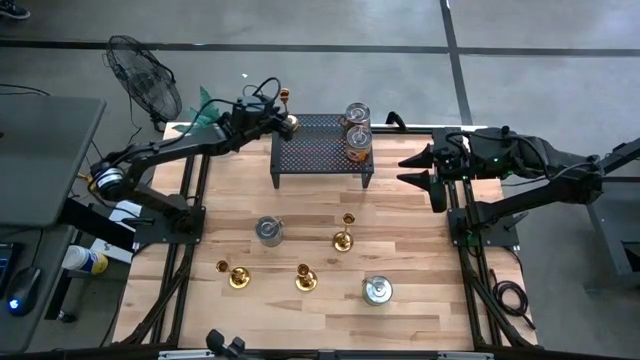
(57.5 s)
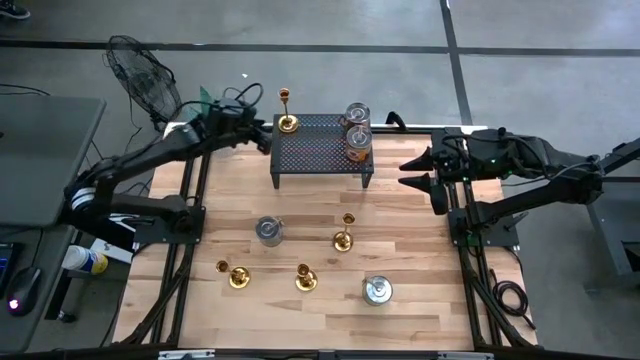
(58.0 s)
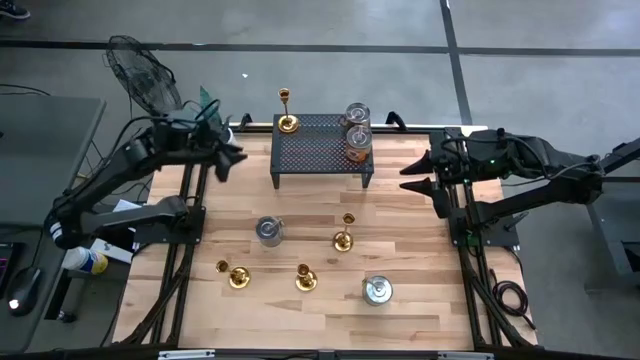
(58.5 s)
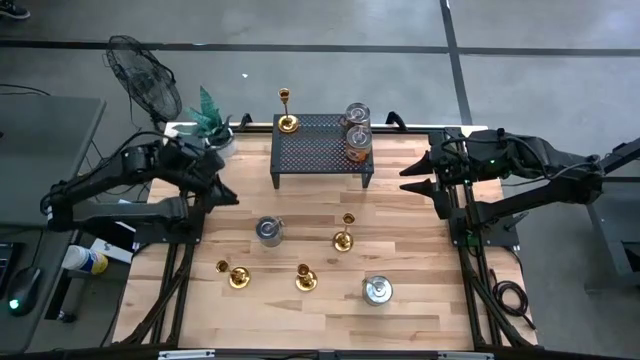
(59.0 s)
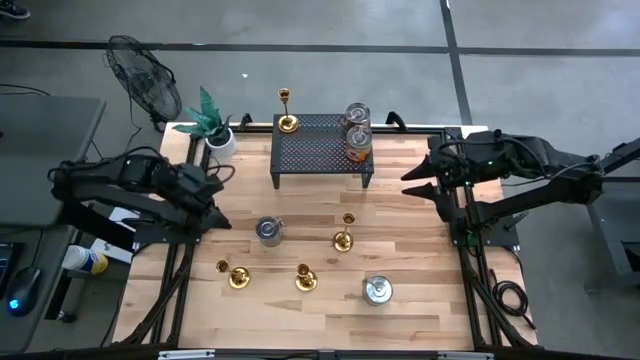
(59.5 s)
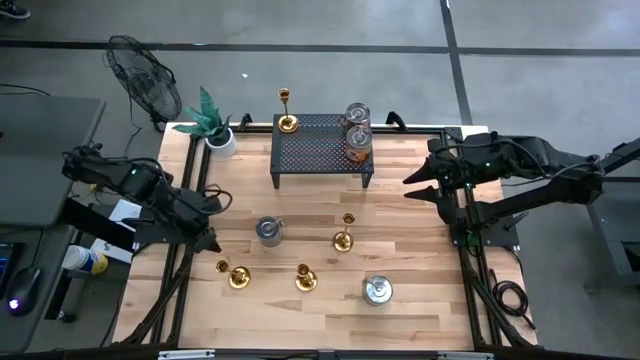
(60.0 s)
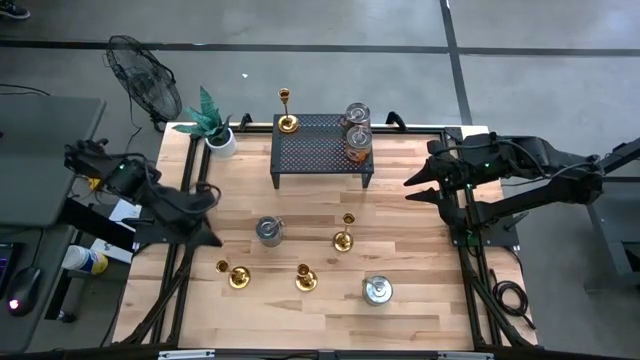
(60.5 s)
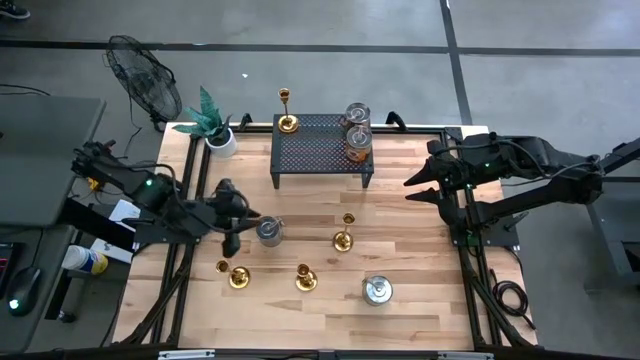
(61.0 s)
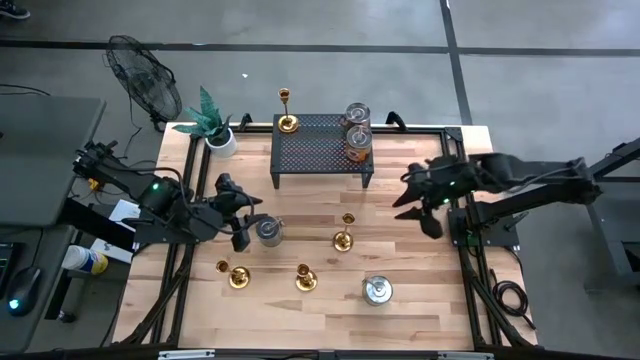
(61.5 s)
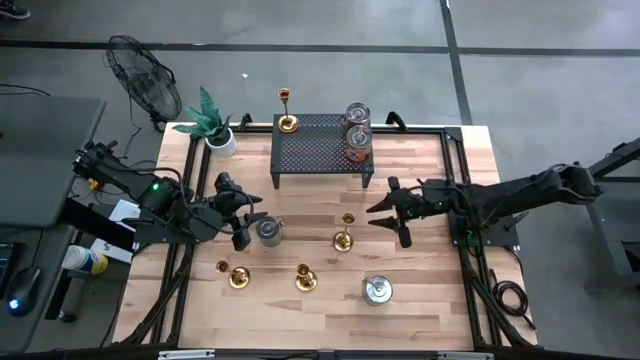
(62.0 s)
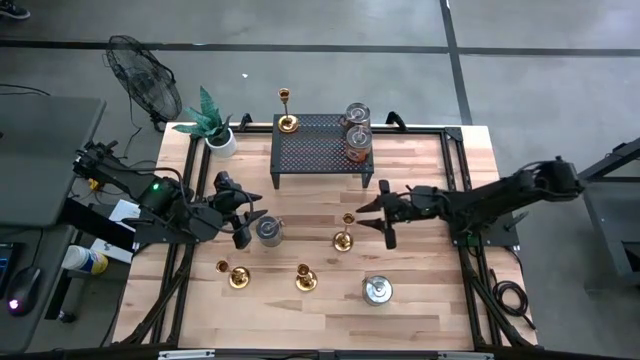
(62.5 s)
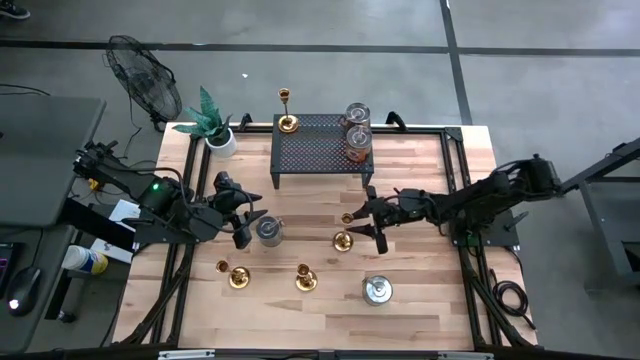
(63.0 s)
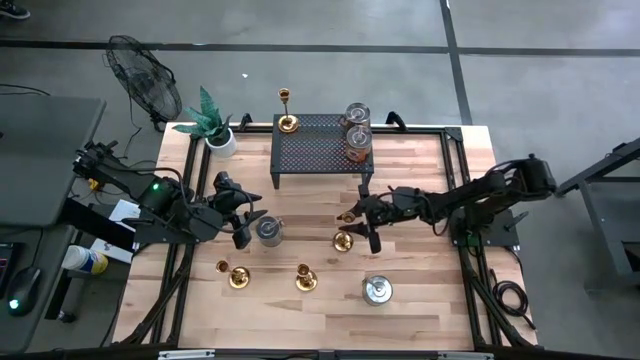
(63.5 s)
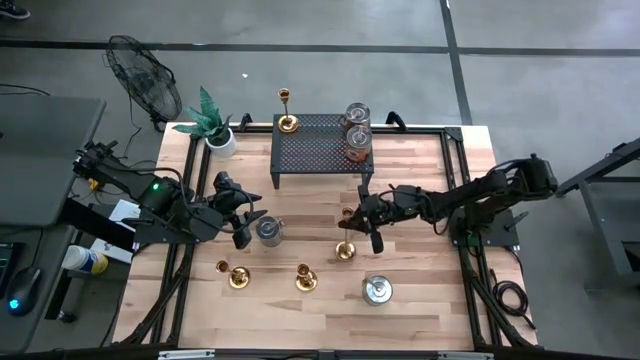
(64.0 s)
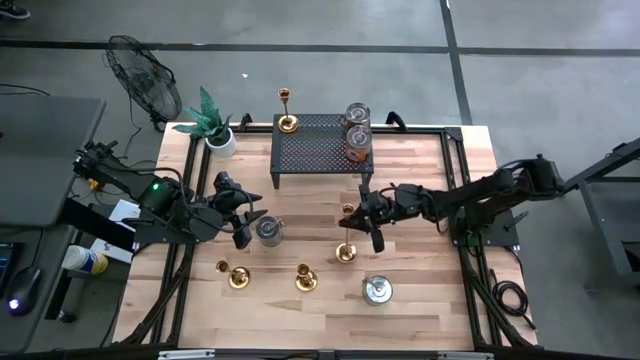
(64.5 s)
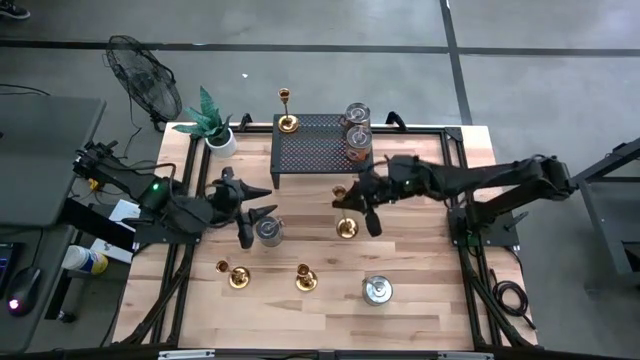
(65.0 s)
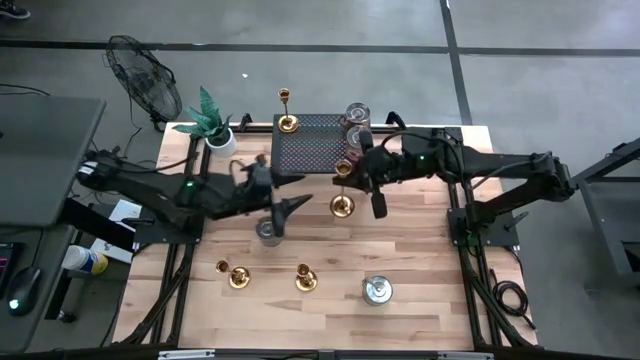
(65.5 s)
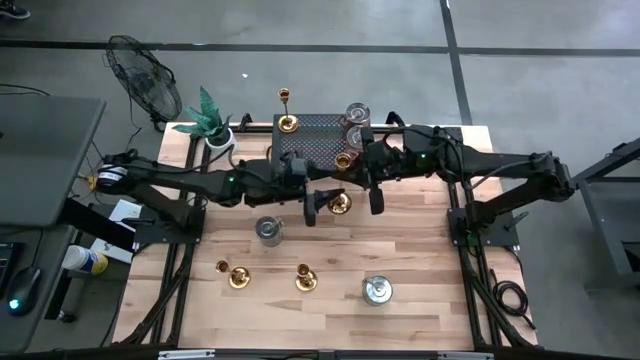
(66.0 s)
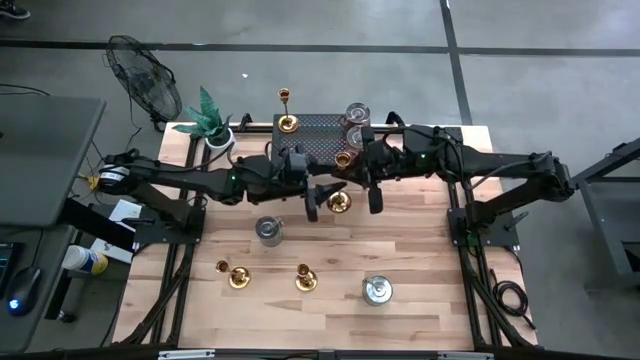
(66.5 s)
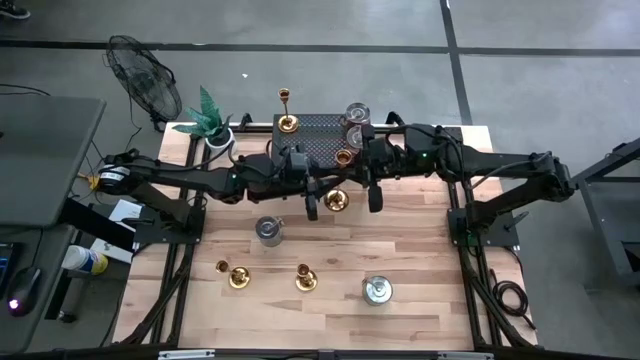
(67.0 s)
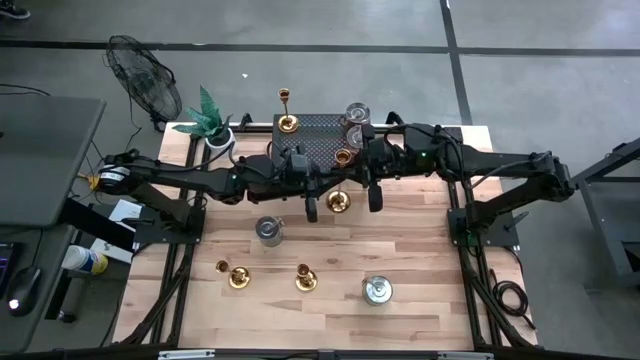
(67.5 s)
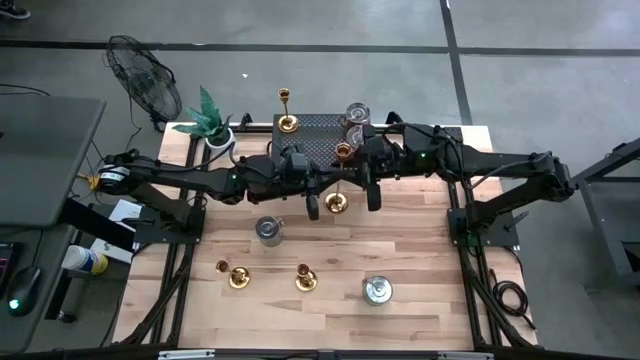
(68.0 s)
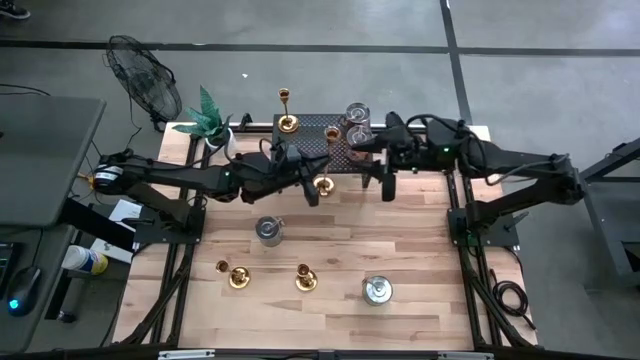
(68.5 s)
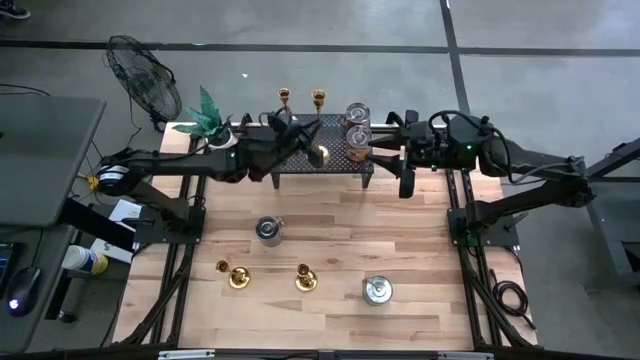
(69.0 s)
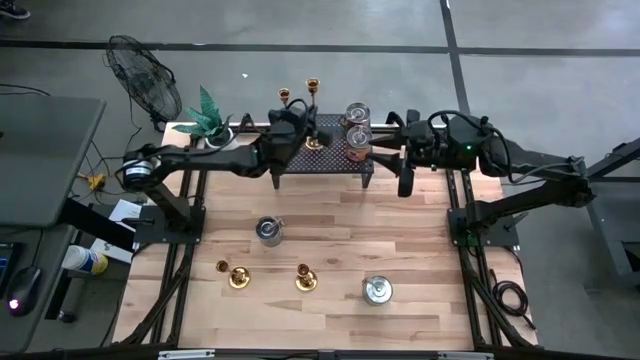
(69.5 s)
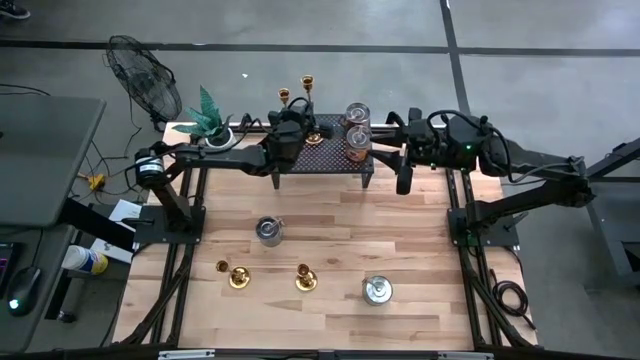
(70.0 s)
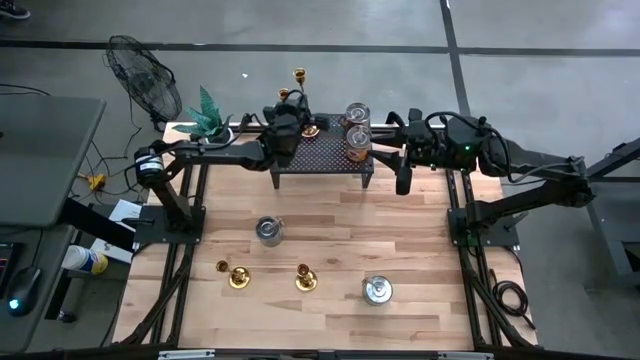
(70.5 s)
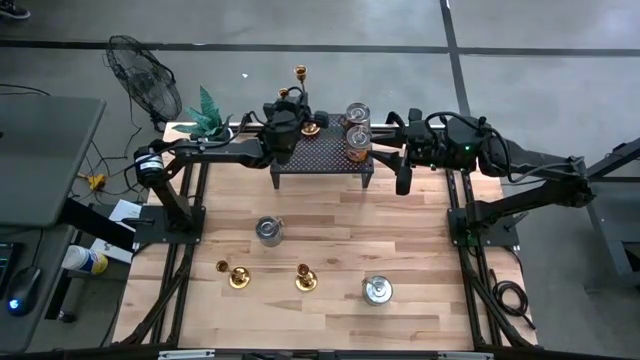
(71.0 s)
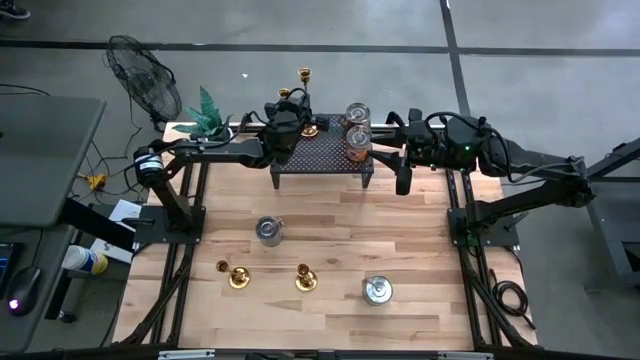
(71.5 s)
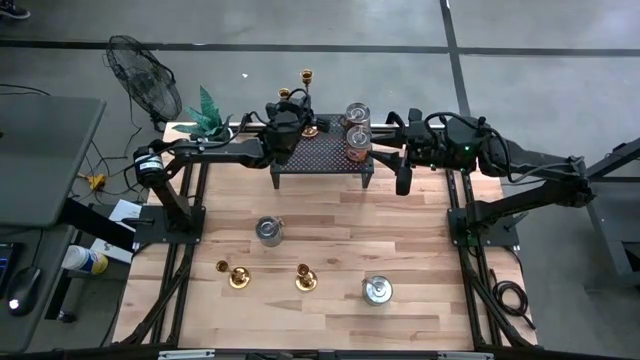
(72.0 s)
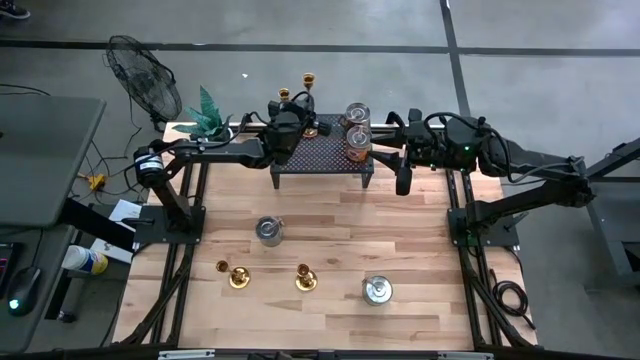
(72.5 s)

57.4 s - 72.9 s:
Task: Pick & Place candle stick holders
Put the gold candle holder on the shelf

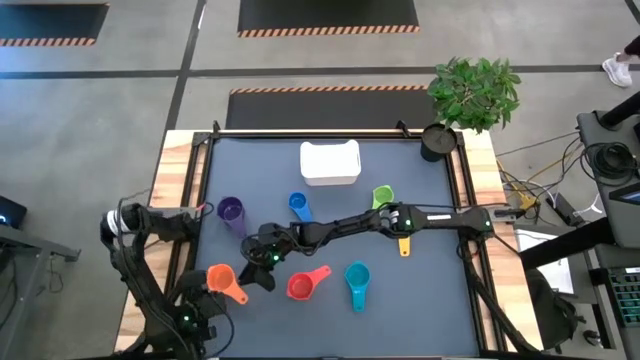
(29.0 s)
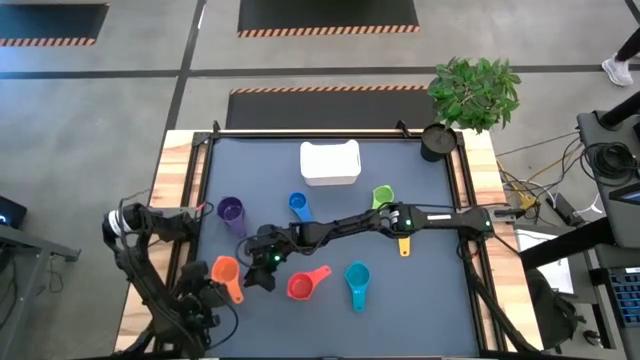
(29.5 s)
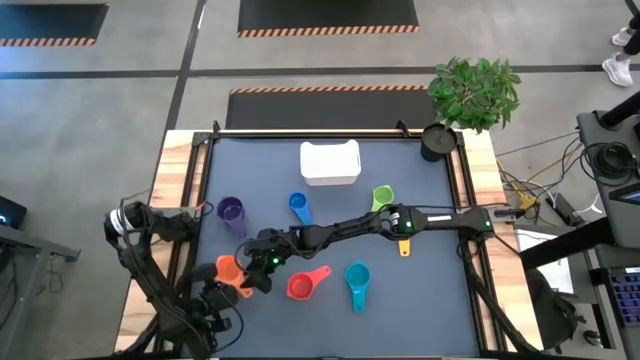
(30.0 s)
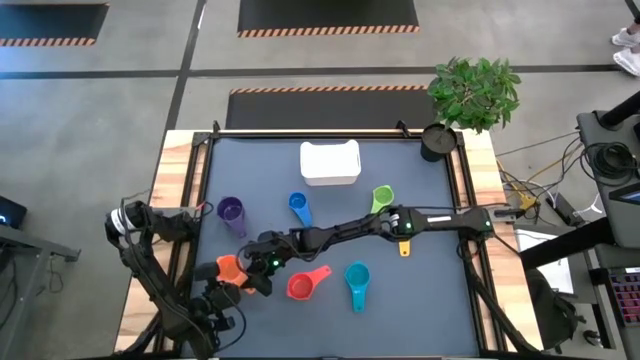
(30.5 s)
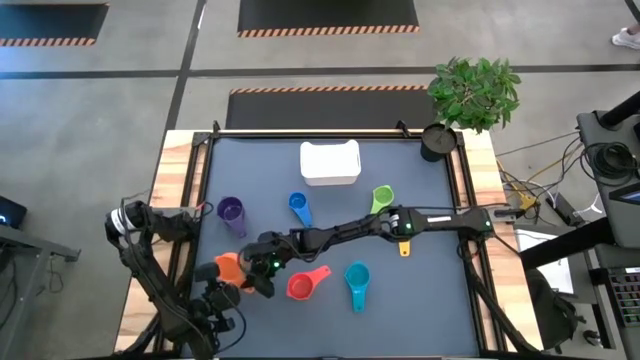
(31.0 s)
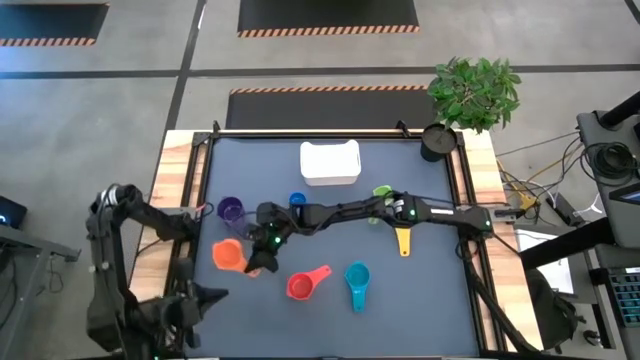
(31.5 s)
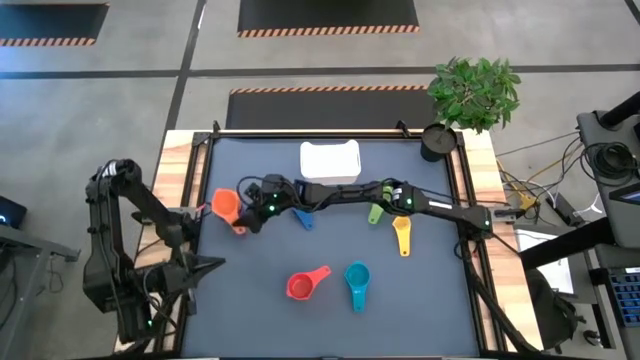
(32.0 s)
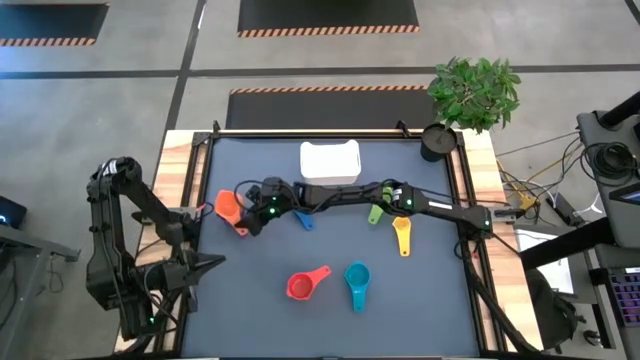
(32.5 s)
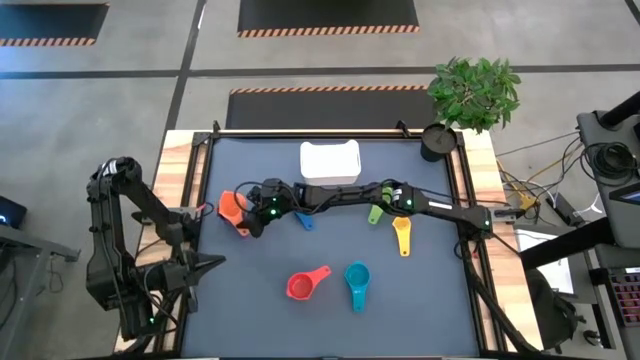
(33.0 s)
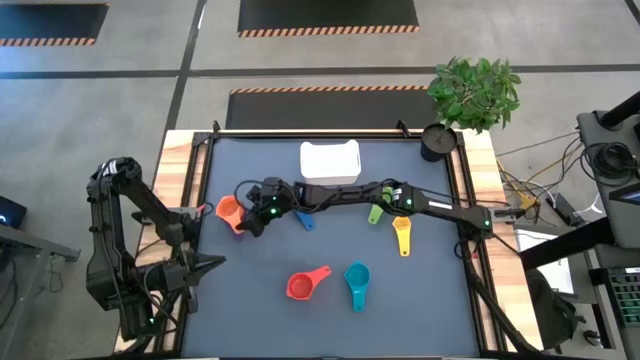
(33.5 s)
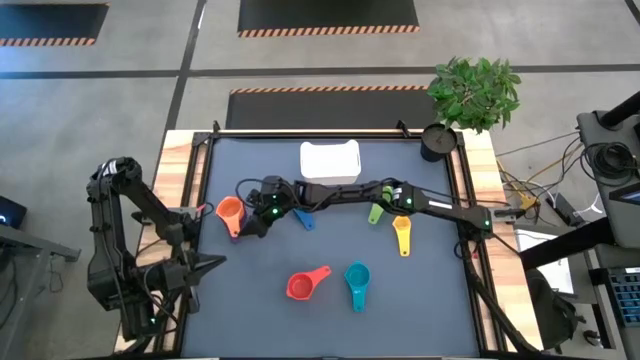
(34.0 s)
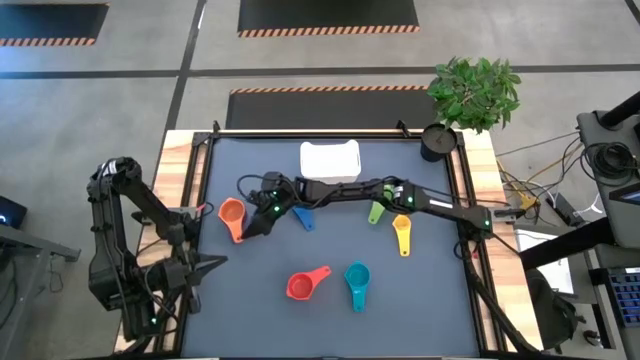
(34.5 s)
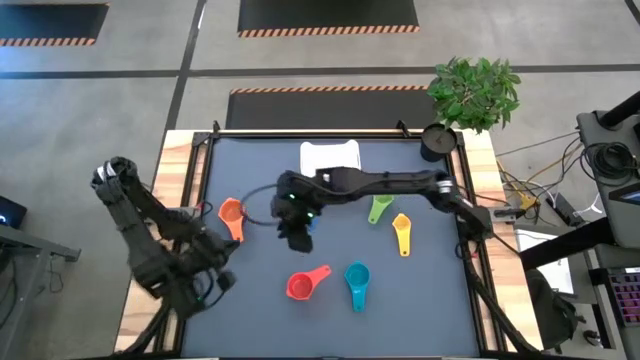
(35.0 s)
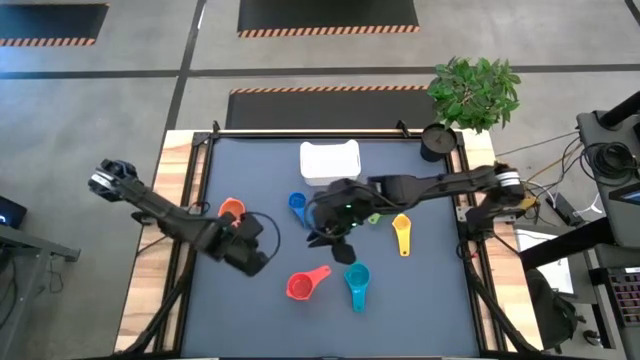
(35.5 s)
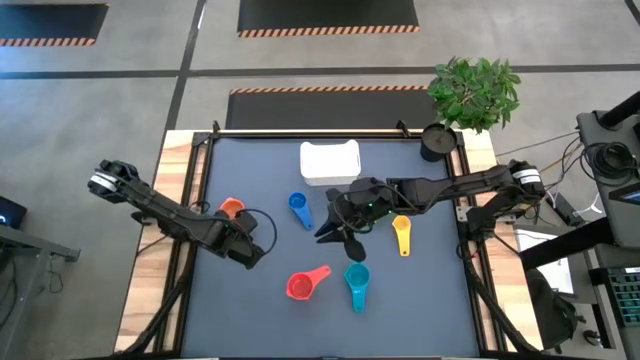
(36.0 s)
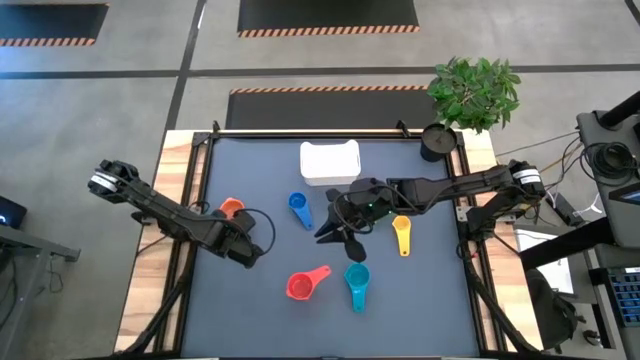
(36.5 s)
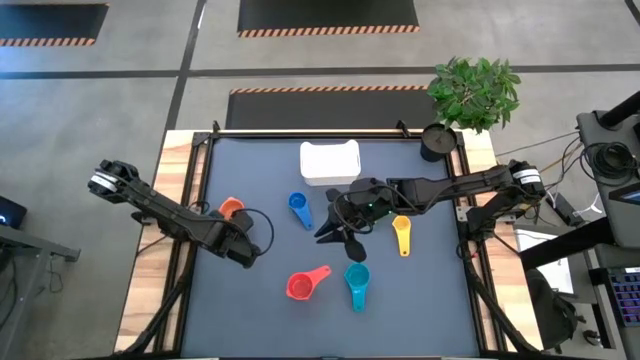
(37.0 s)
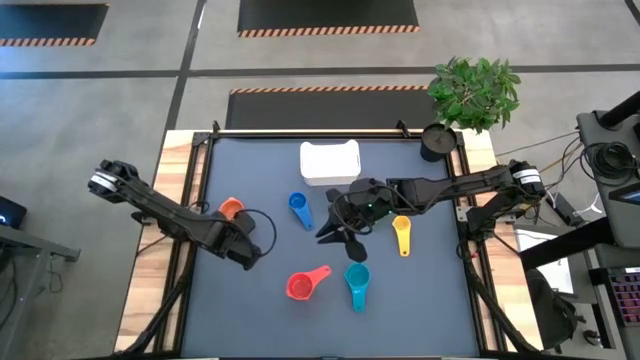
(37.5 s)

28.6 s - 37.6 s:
Task: Nest measuring cups in basket
Stack the orange measuring cup on top of the purple measuring cup
